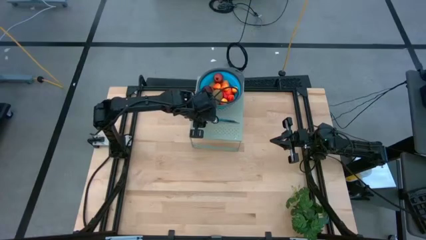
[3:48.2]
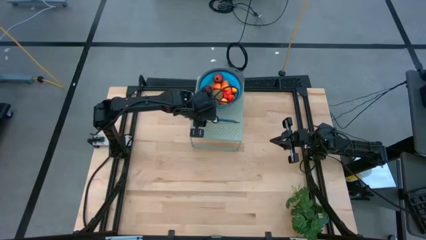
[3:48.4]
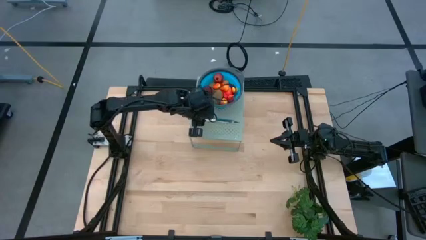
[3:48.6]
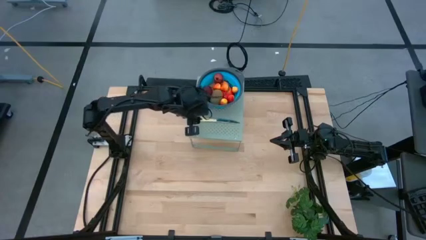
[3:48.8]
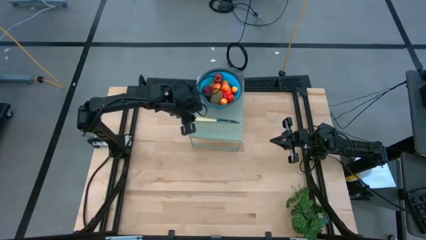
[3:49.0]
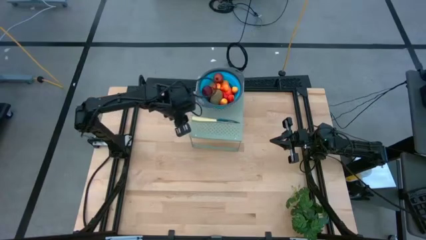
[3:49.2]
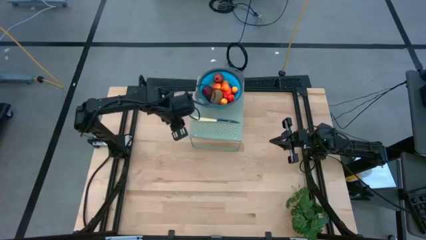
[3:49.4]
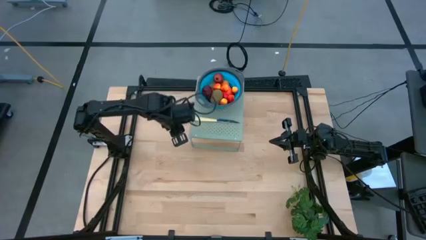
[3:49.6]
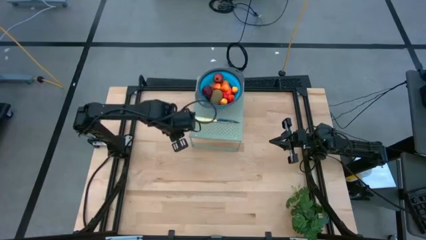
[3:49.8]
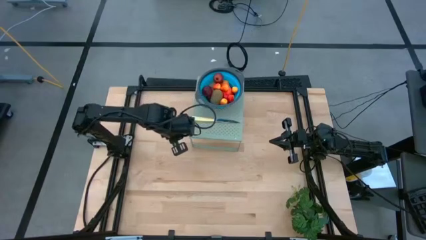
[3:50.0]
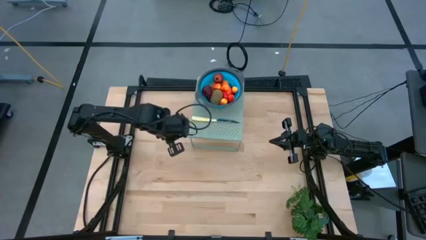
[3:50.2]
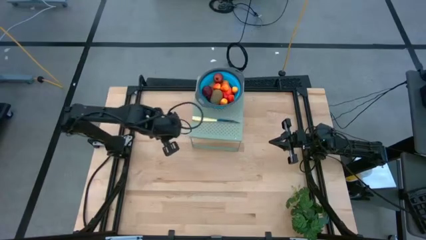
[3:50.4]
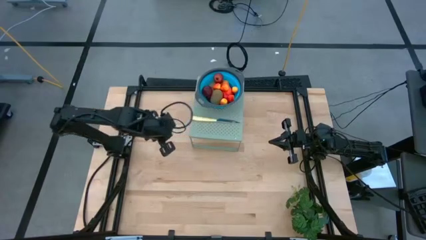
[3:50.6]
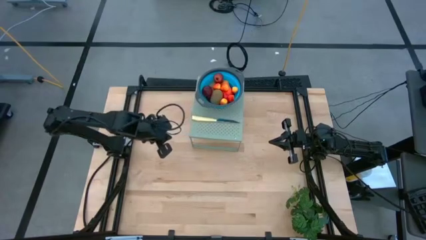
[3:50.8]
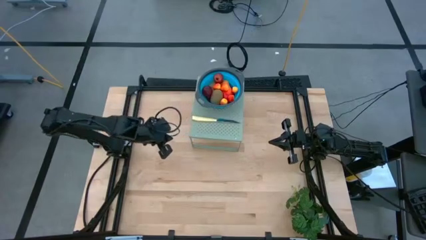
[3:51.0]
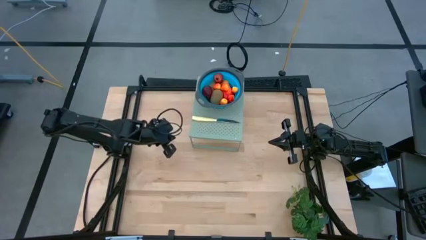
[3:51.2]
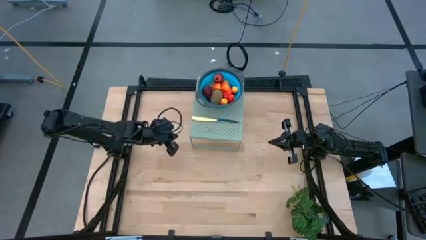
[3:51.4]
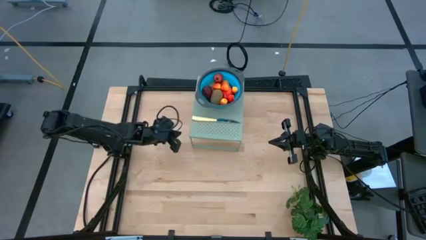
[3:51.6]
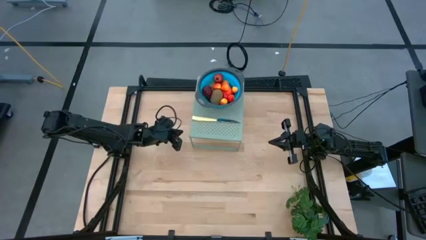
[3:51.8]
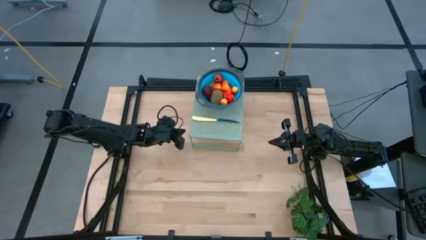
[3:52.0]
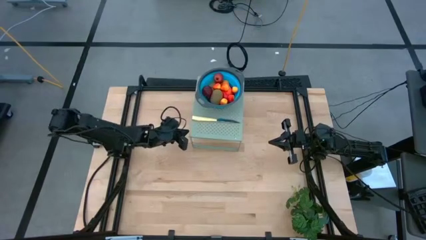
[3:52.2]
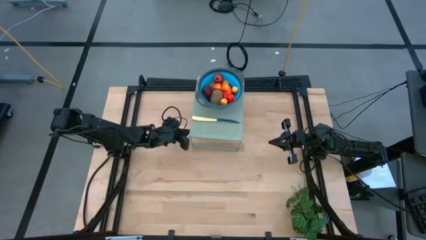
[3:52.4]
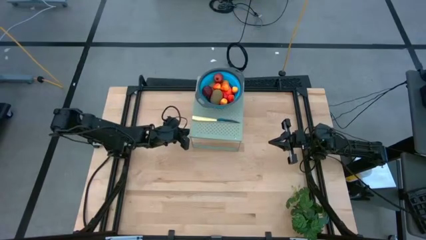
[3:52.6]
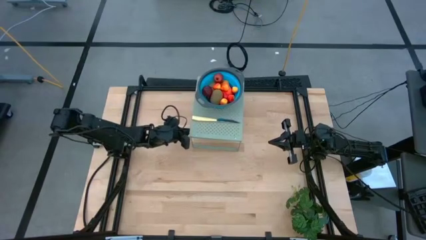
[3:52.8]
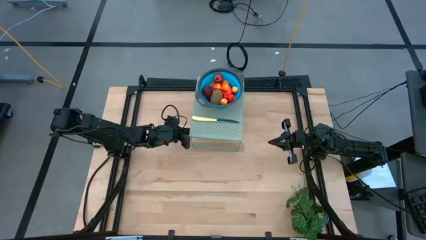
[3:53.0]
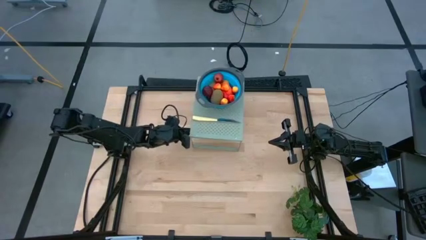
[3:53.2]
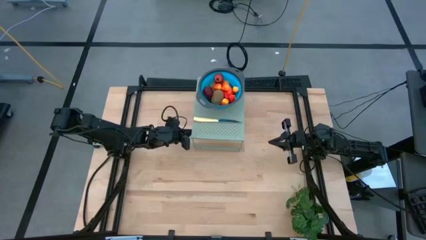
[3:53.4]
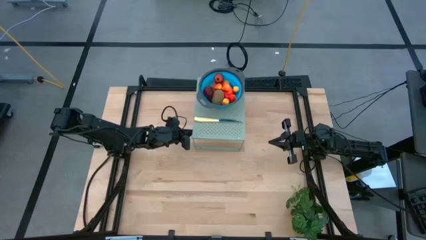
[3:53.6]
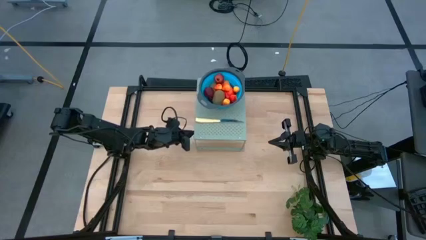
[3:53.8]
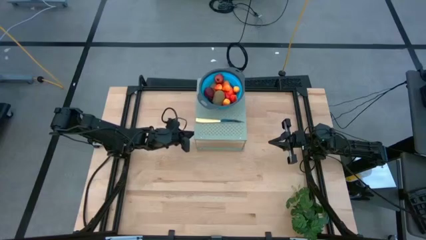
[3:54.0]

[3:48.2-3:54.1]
Task: Pick & Place Fruit
Adjust the shelf

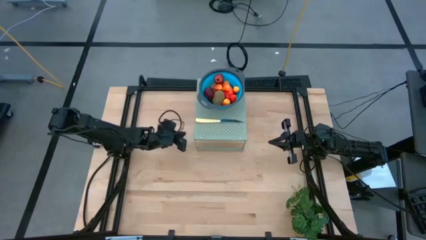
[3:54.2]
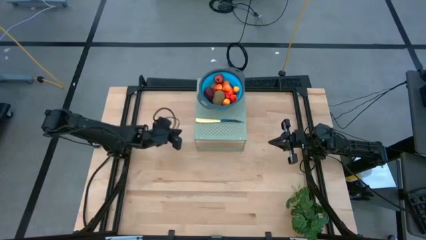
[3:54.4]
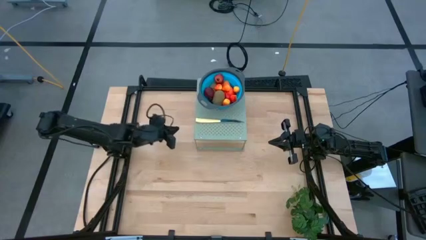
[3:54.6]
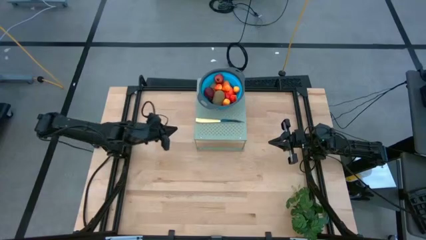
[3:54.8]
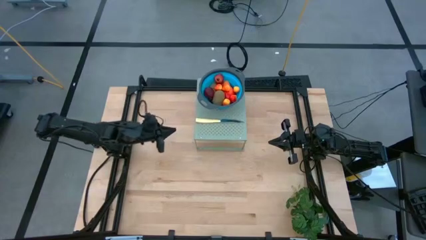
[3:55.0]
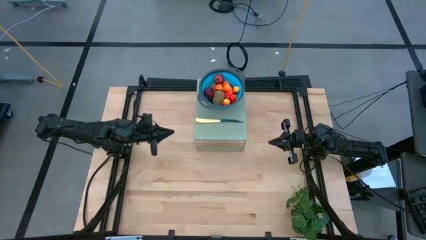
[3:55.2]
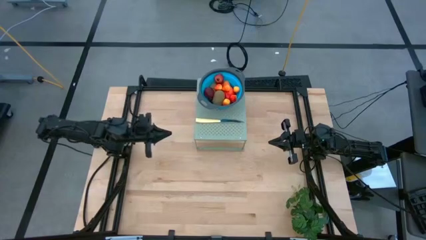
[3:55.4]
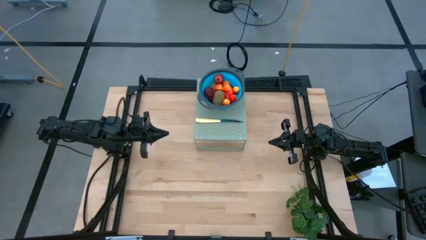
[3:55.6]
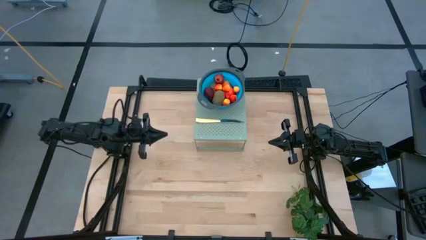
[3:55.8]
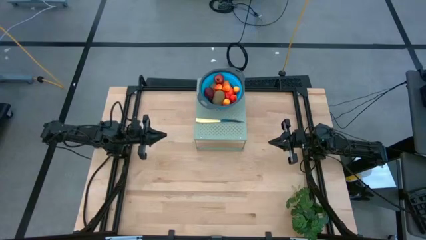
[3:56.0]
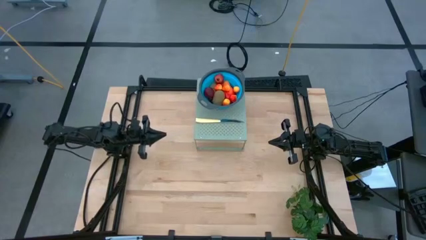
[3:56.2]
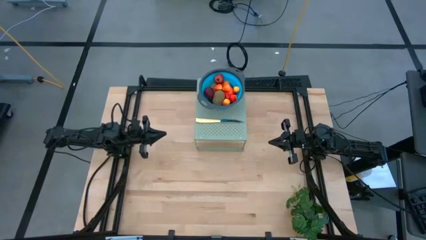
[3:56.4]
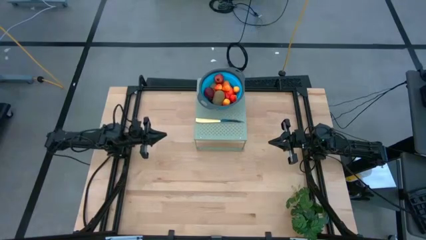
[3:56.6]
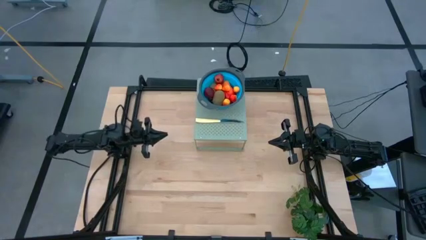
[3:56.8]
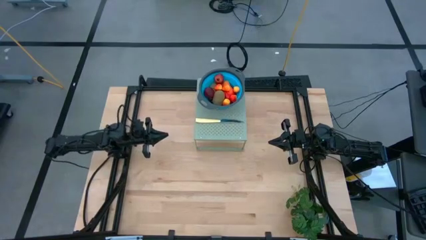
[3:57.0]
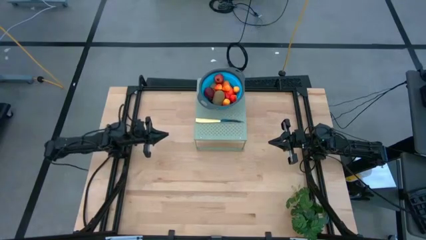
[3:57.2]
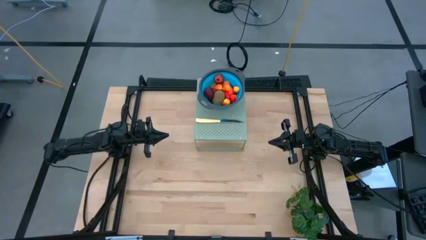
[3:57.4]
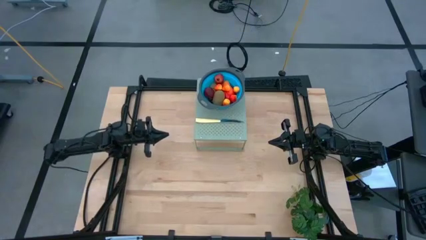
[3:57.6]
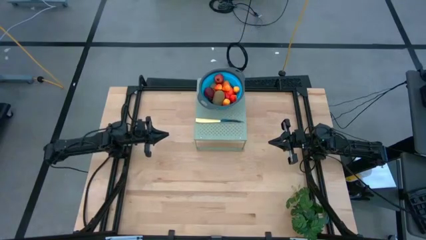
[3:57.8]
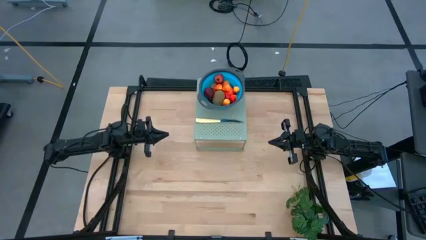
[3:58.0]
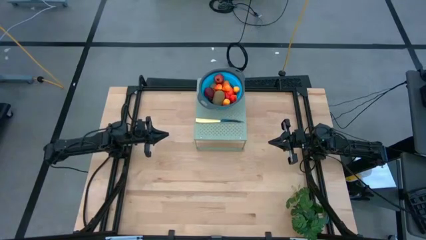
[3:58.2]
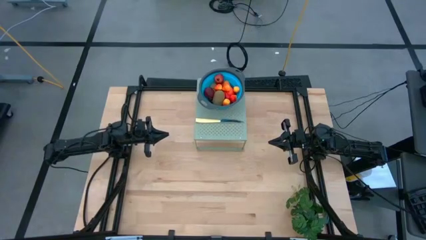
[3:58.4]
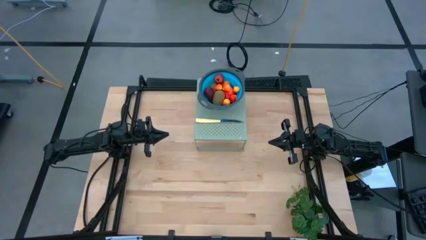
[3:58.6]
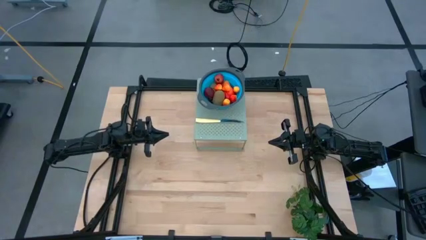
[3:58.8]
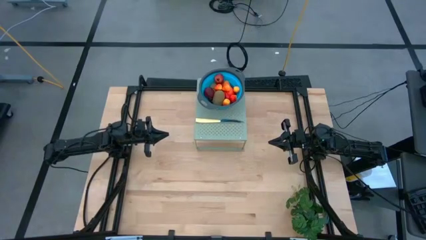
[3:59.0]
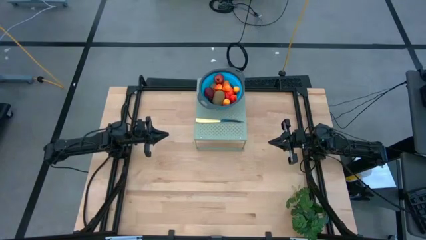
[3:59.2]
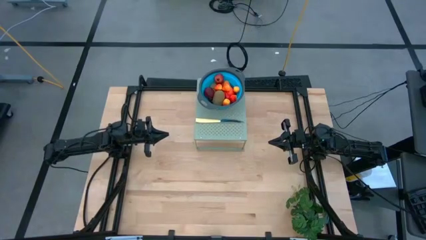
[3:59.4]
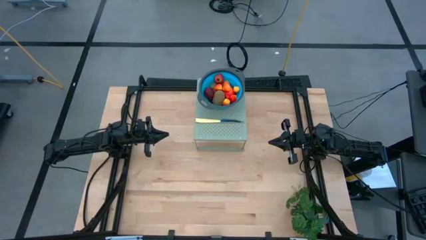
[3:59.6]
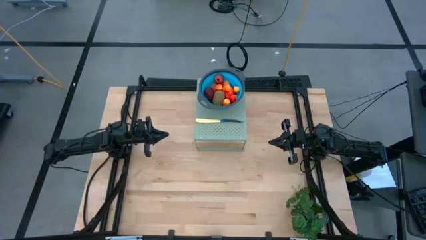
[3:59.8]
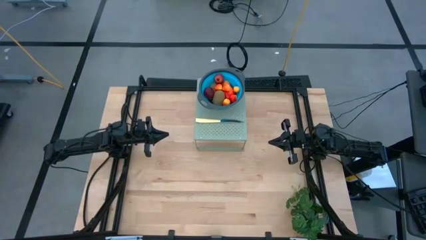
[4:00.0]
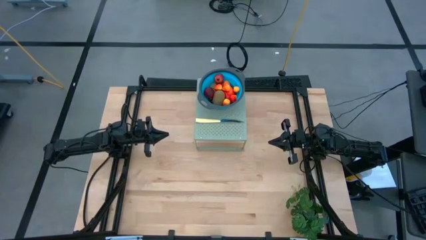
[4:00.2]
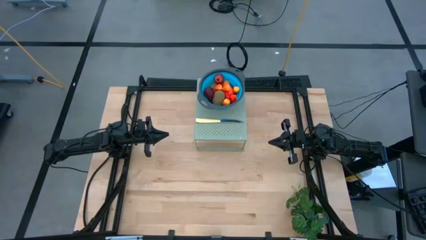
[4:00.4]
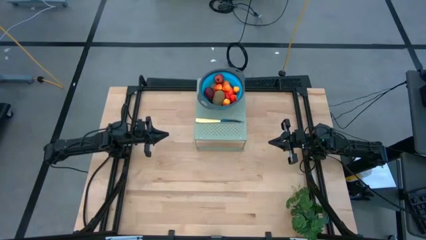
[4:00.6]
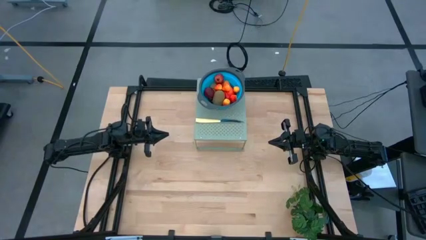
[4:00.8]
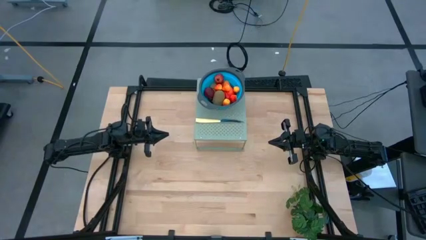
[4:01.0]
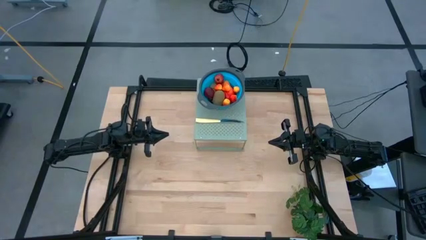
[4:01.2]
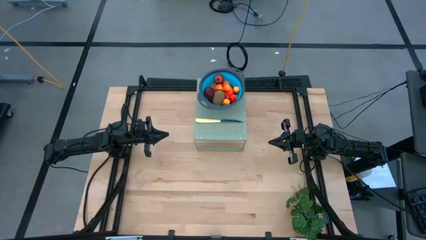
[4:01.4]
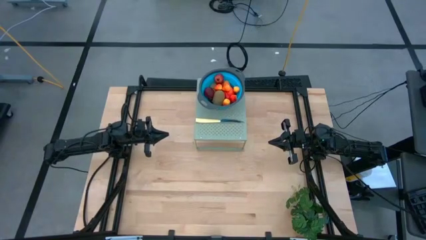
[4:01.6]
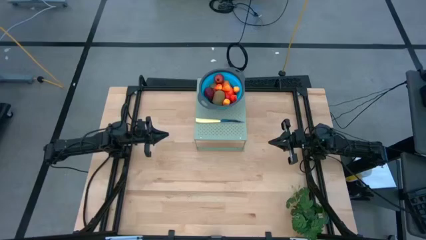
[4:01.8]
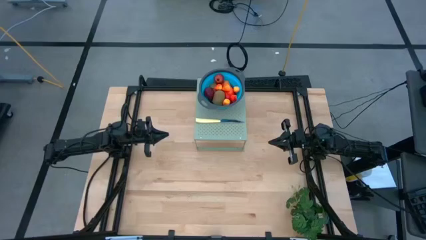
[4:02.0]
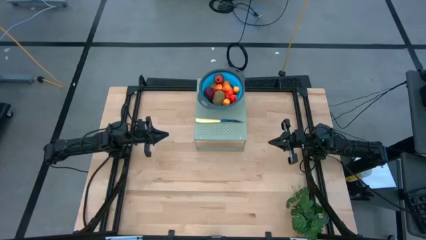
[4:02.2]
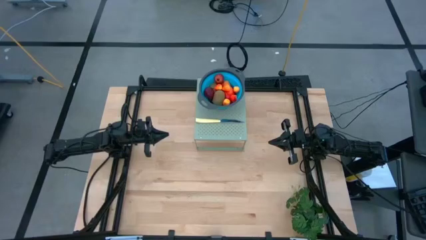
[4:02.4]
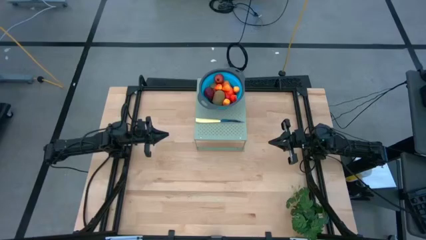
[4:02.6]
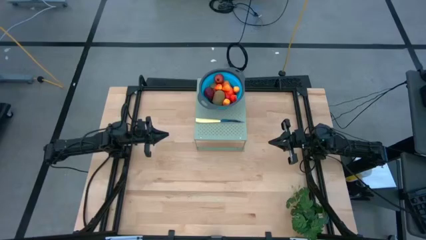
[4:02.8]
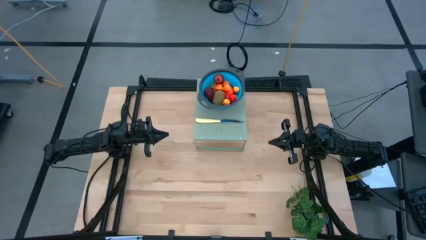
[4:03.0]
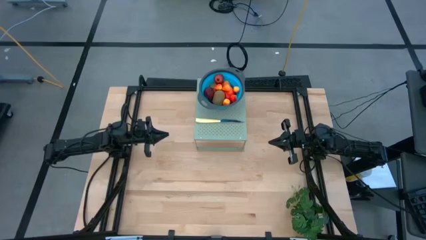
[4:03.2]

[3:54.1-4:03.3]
Return to Home Position
